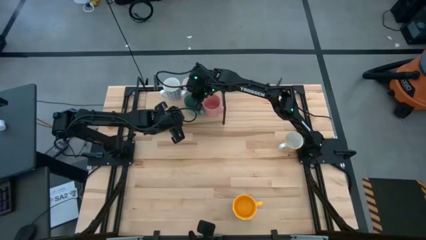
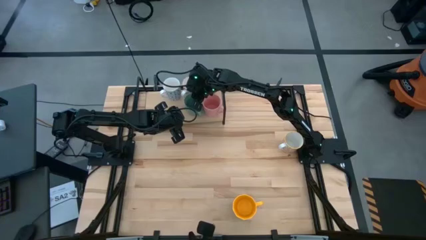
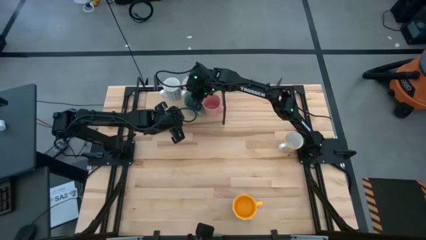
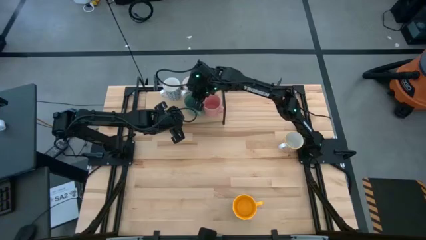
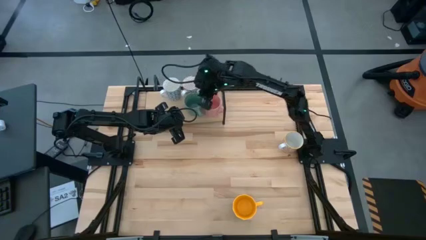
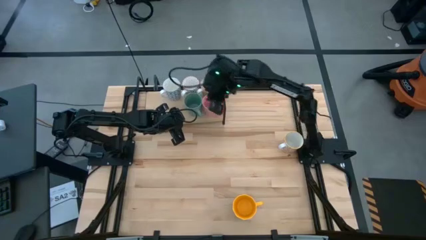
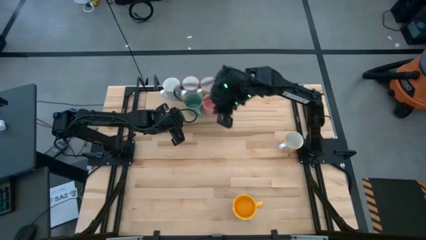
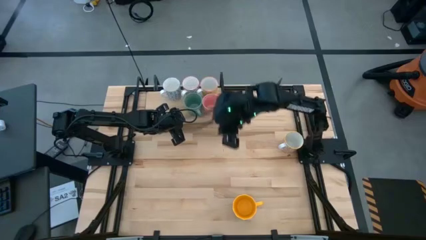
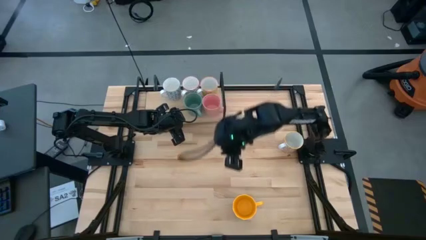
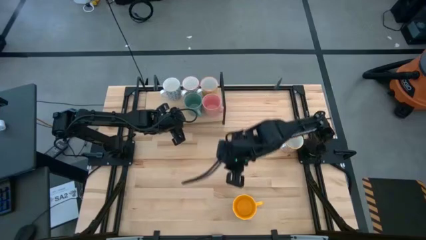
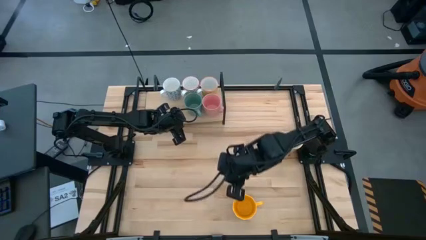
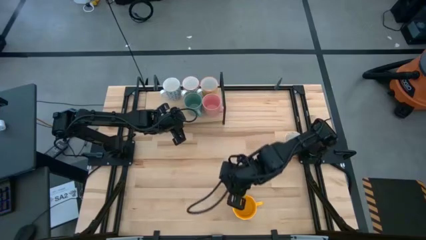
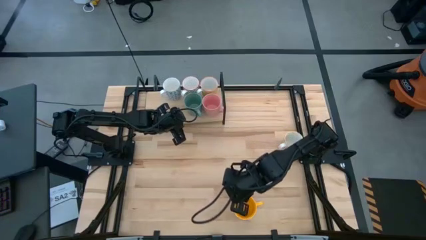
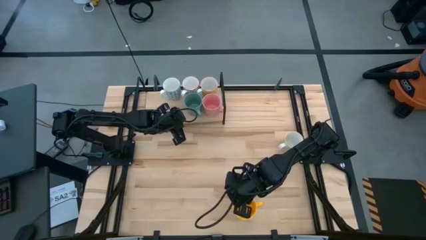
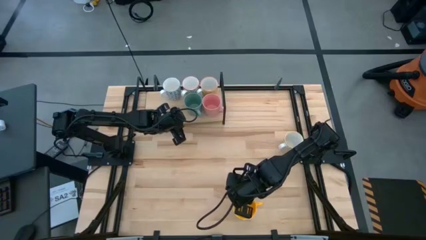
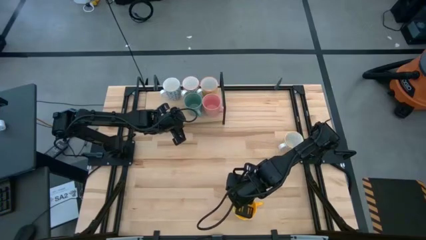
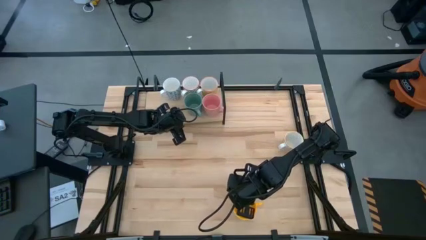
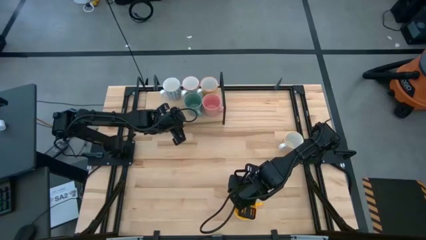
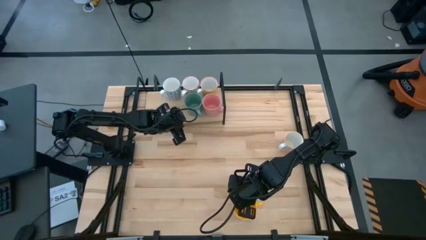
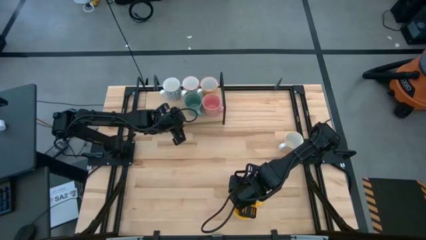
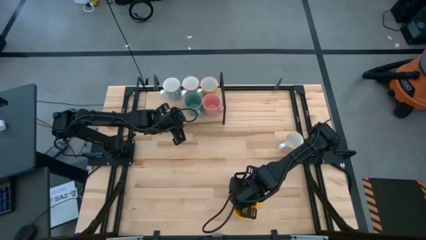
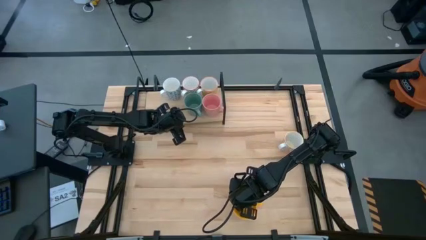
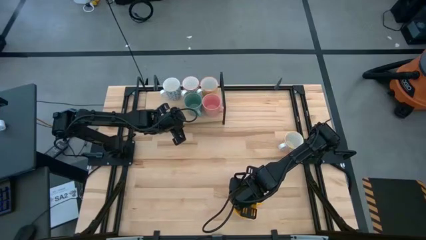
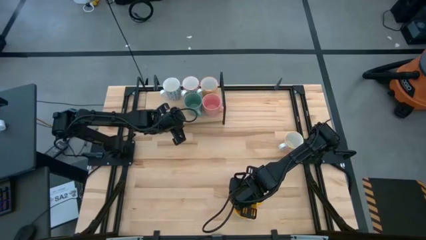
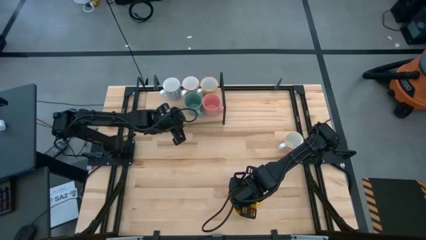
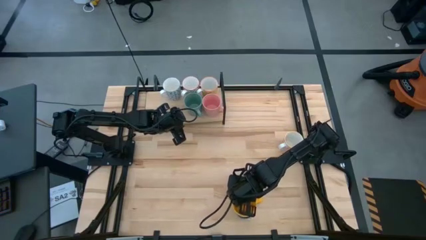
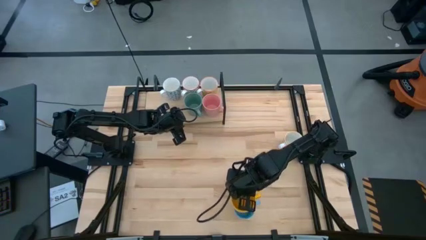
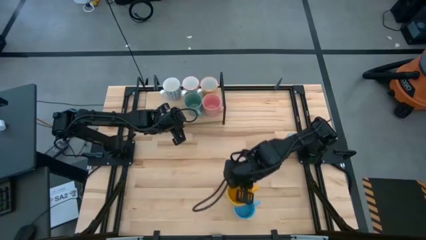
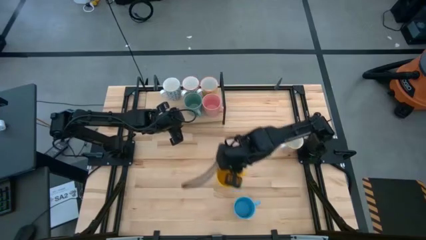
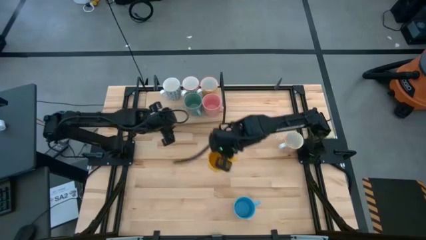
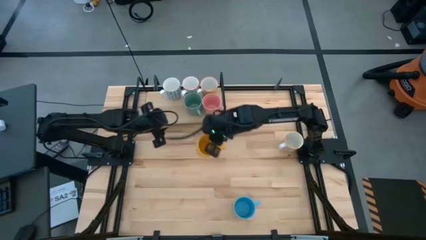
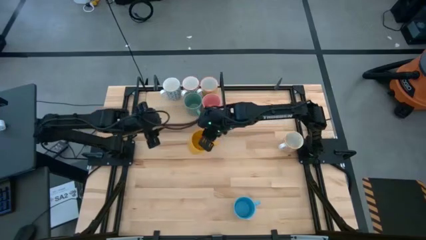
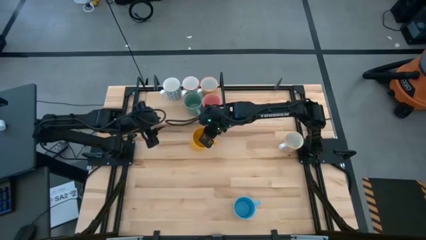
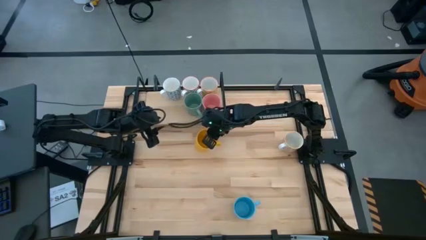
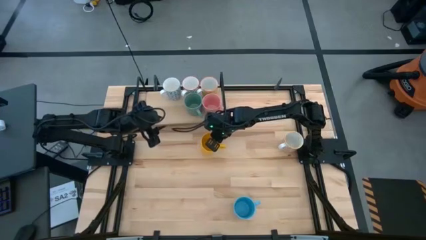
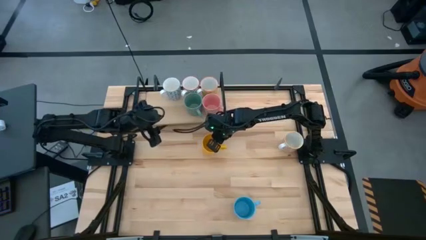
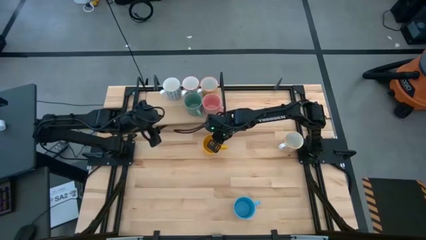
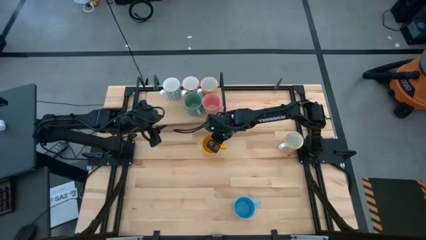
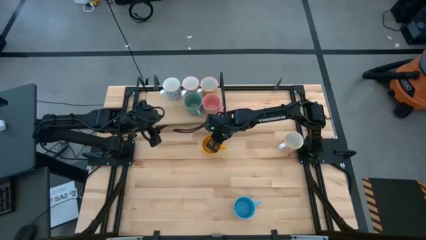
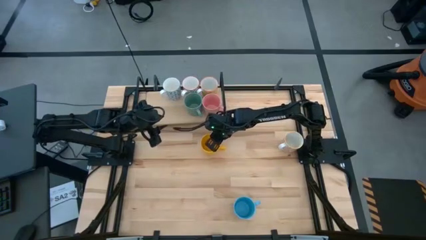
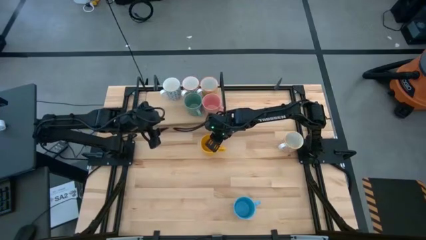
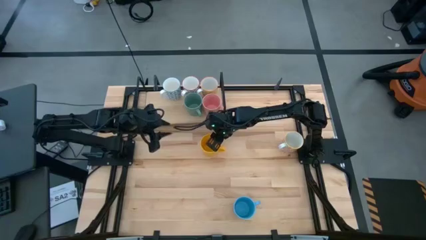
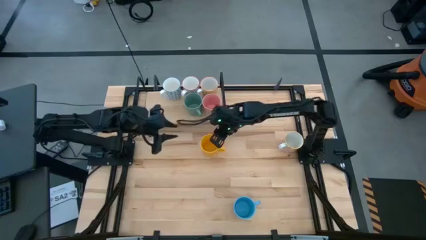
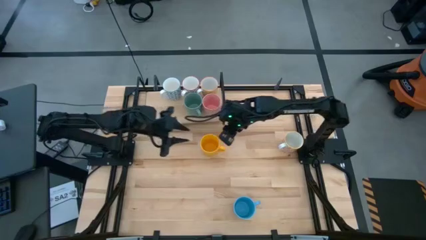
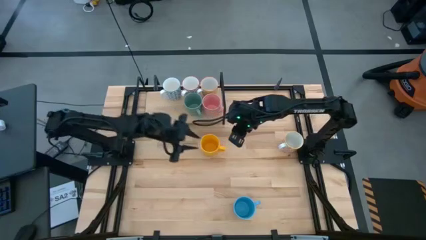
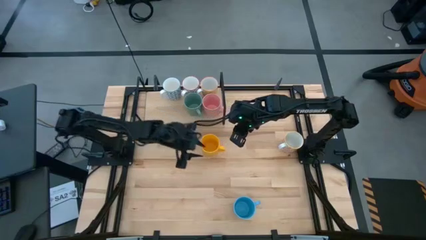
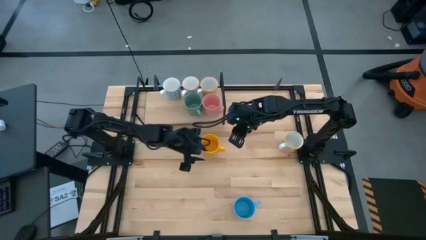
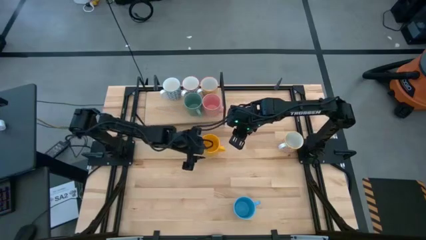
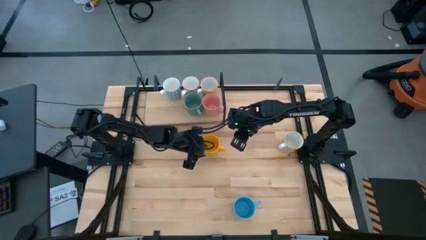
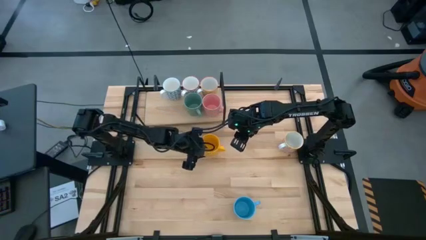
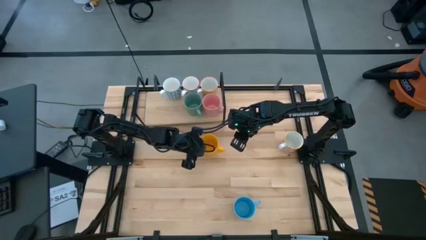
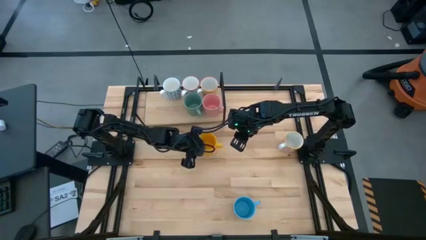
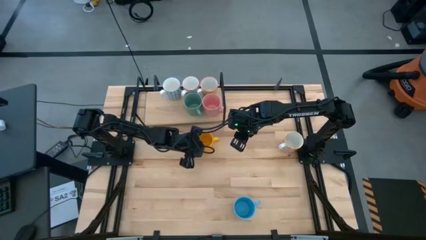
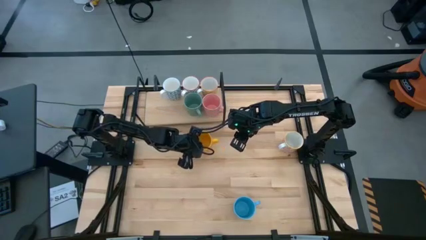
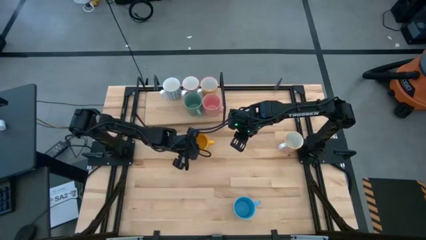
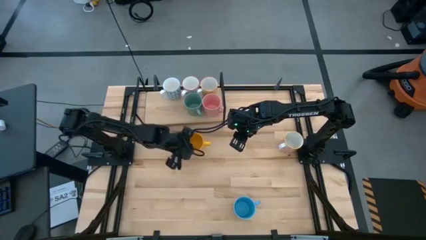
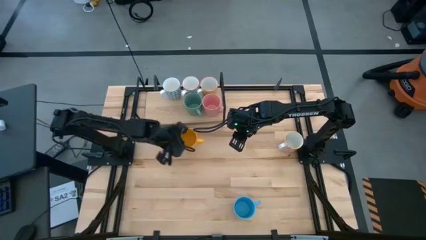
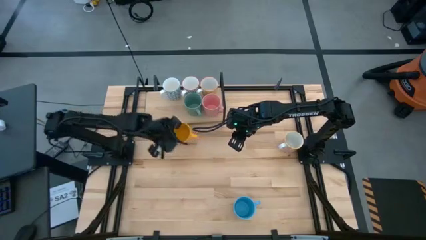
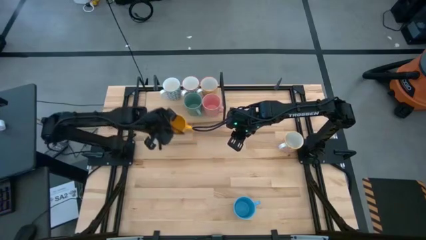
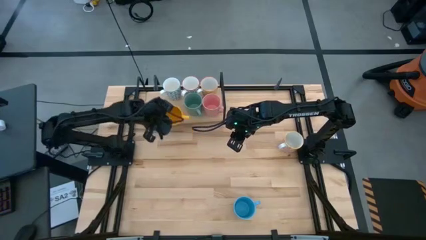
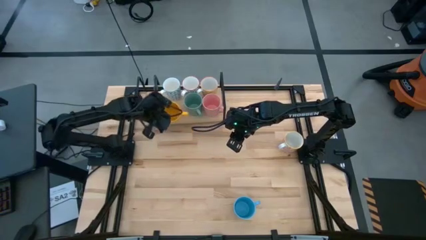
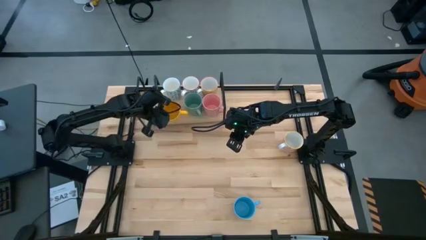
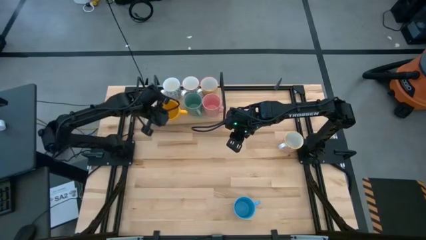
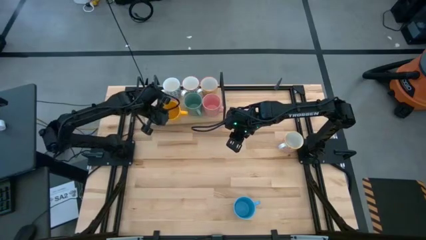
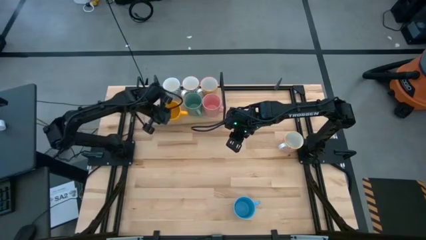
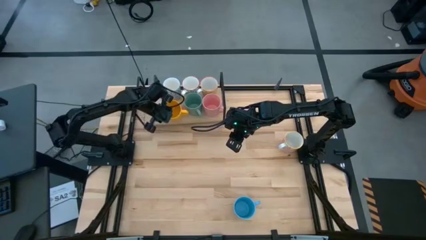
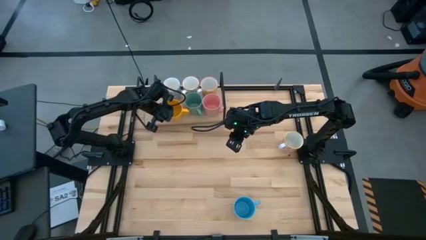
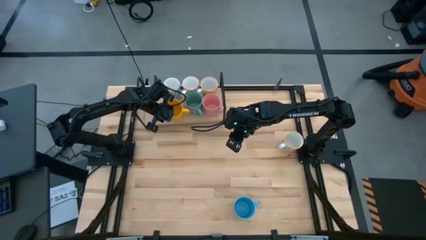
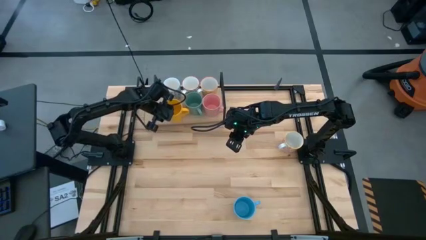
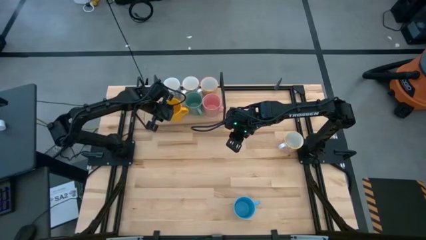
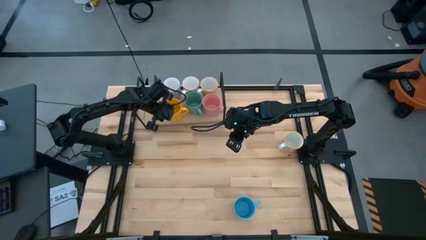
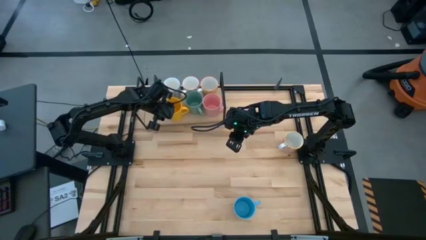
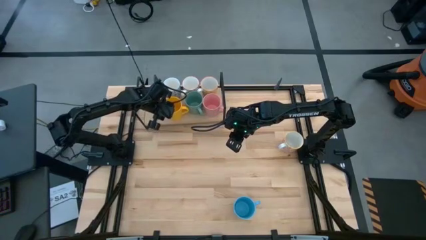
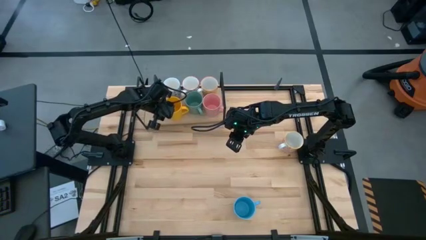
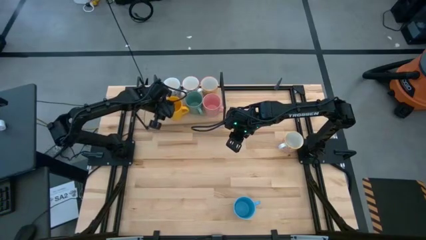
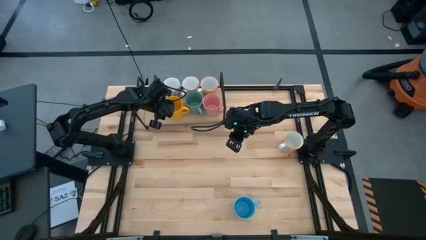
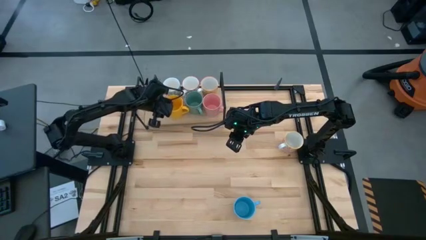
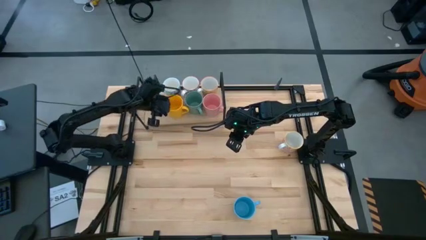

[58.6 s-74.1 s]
Task: Place coffee mugs
Put the yellow mug on the shelf
